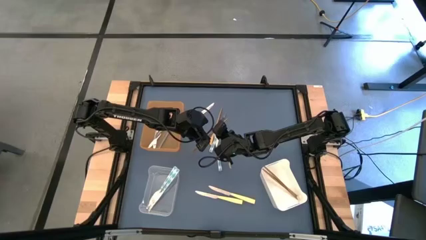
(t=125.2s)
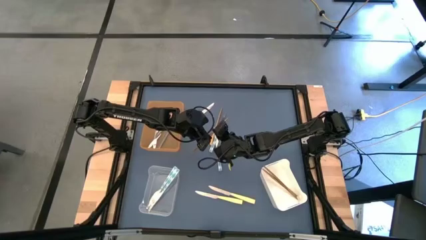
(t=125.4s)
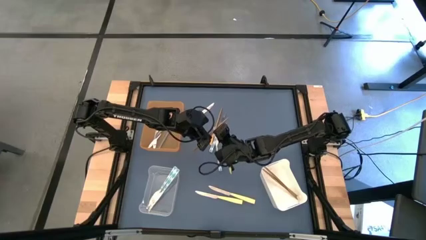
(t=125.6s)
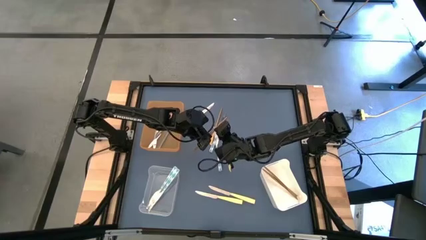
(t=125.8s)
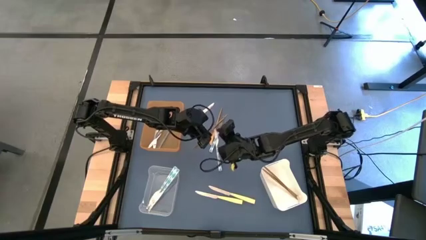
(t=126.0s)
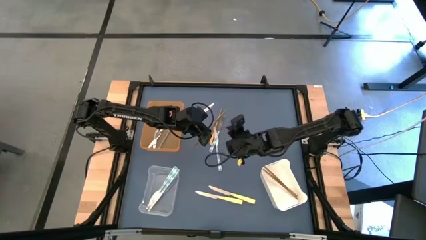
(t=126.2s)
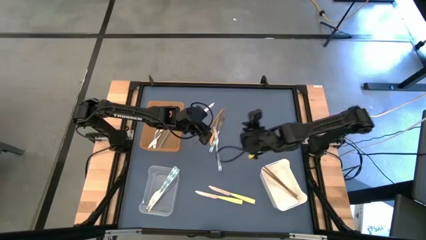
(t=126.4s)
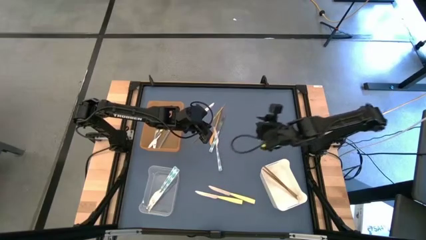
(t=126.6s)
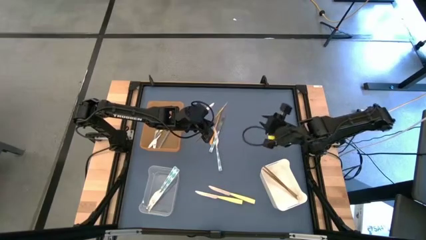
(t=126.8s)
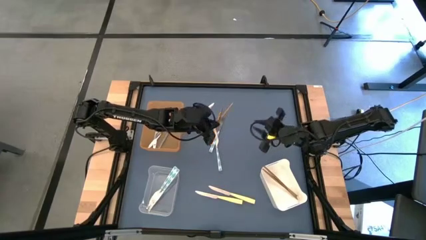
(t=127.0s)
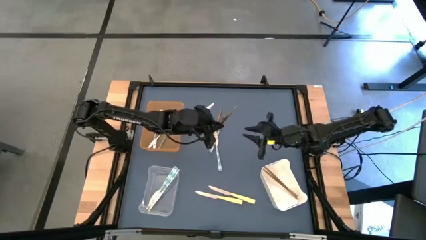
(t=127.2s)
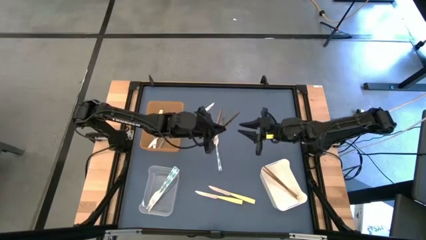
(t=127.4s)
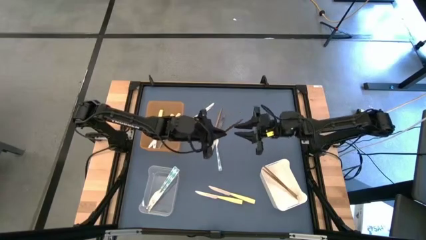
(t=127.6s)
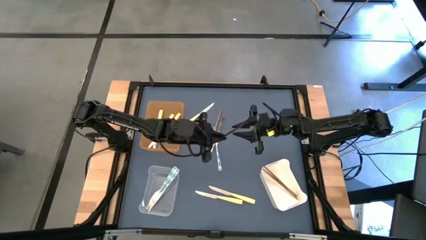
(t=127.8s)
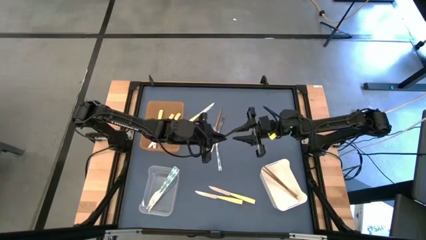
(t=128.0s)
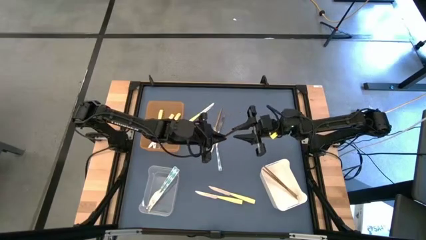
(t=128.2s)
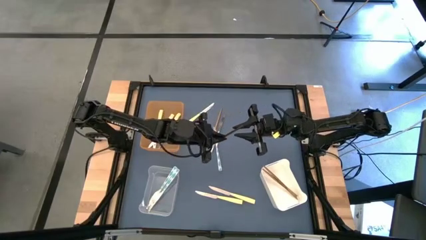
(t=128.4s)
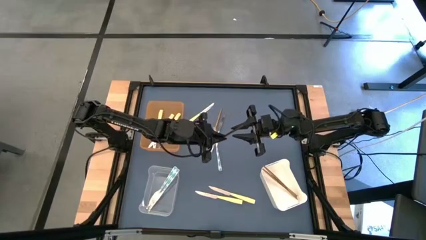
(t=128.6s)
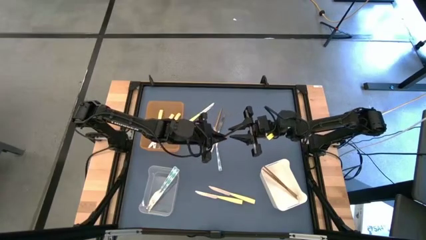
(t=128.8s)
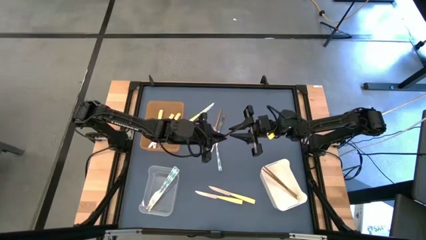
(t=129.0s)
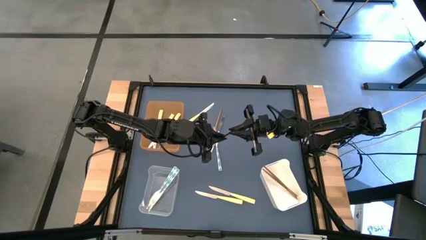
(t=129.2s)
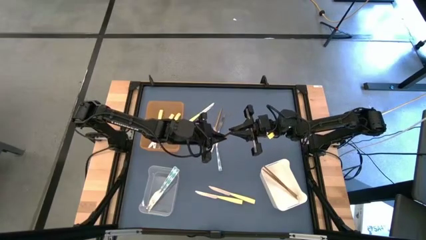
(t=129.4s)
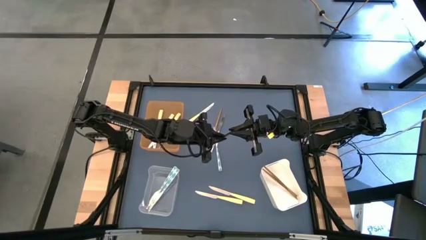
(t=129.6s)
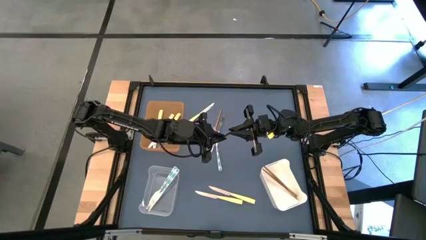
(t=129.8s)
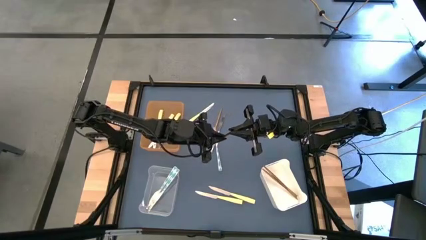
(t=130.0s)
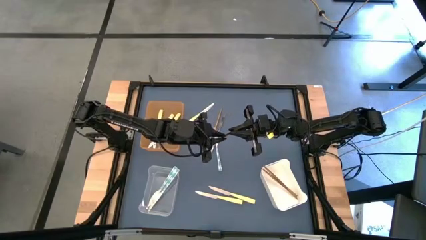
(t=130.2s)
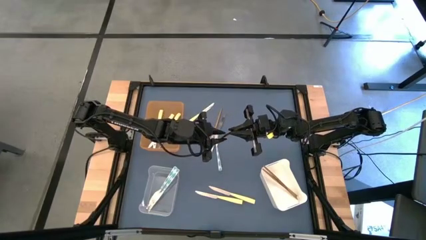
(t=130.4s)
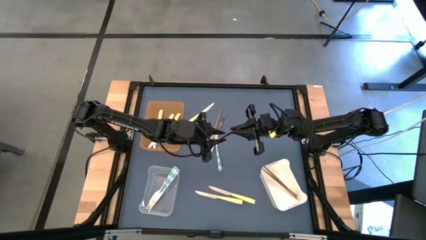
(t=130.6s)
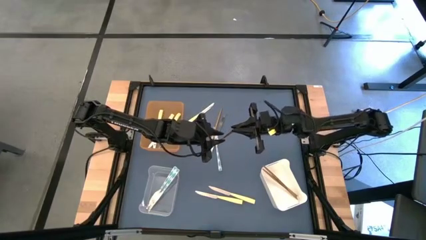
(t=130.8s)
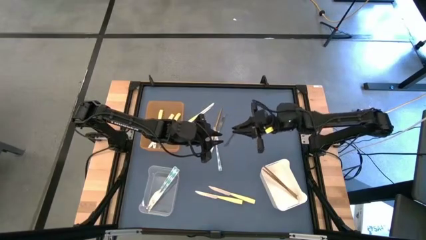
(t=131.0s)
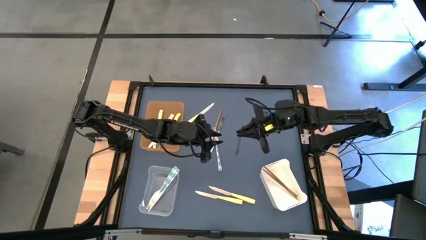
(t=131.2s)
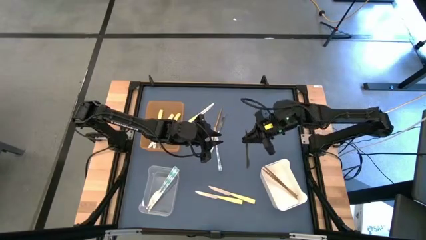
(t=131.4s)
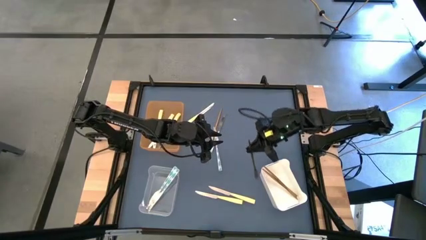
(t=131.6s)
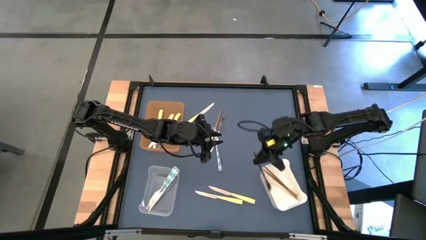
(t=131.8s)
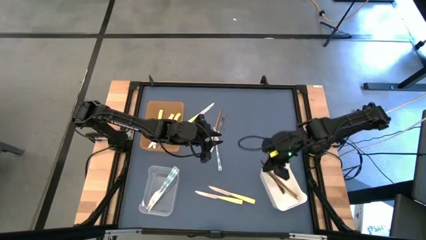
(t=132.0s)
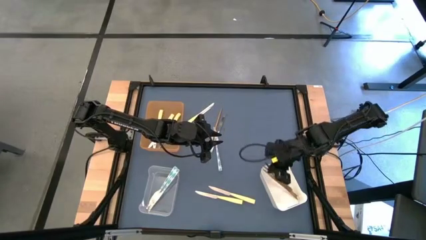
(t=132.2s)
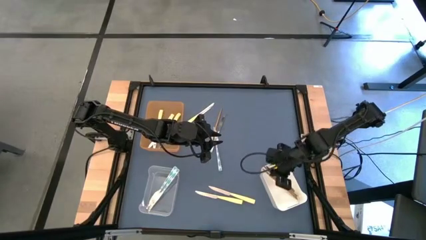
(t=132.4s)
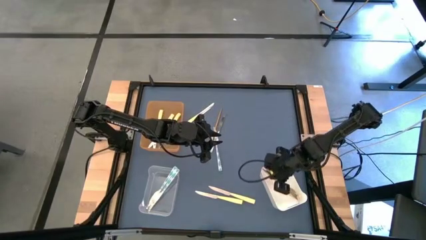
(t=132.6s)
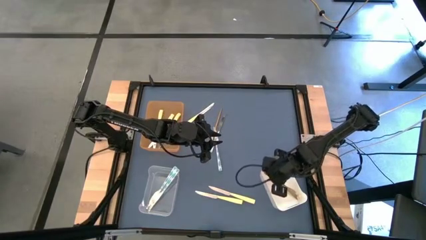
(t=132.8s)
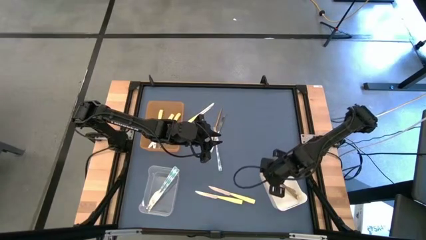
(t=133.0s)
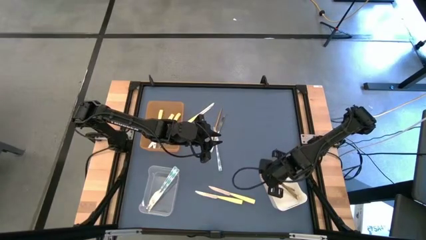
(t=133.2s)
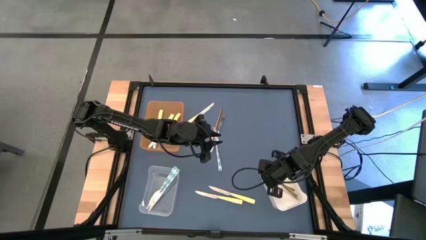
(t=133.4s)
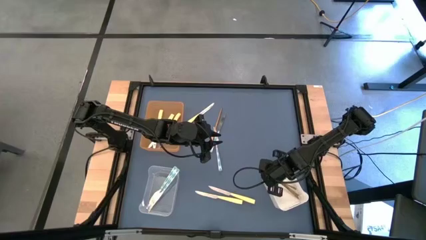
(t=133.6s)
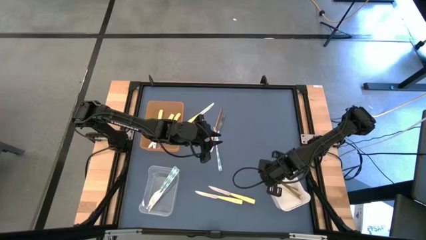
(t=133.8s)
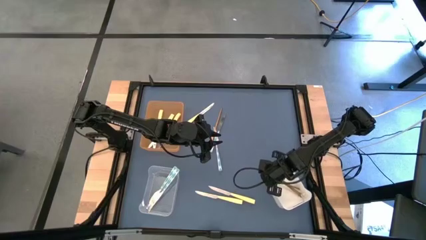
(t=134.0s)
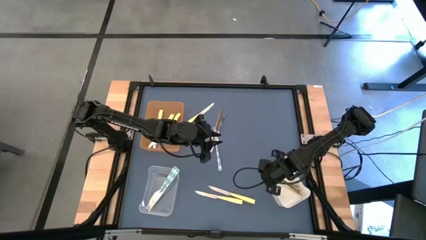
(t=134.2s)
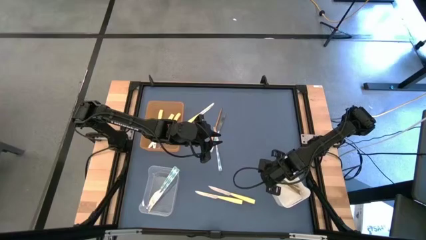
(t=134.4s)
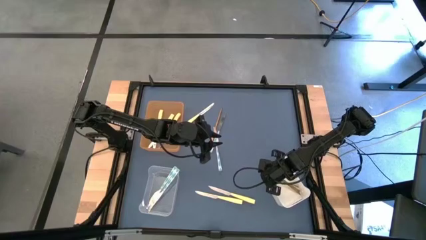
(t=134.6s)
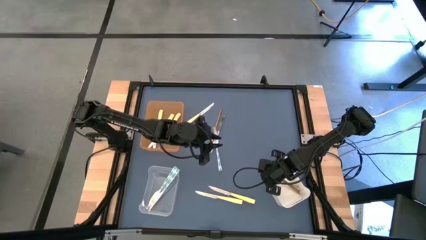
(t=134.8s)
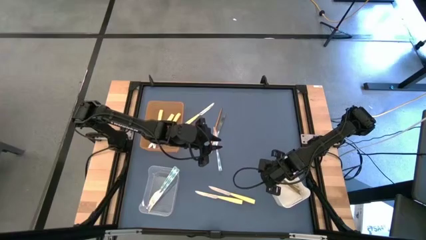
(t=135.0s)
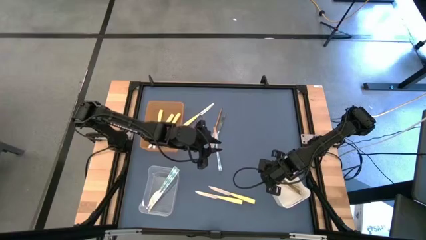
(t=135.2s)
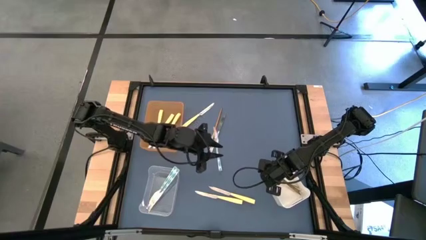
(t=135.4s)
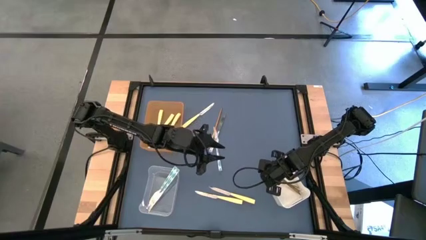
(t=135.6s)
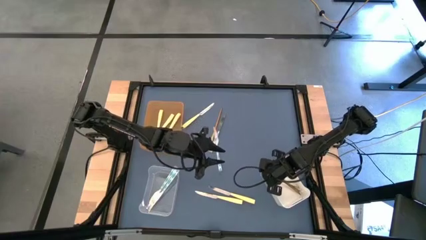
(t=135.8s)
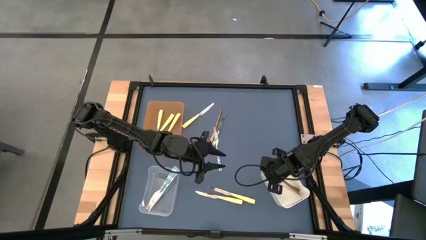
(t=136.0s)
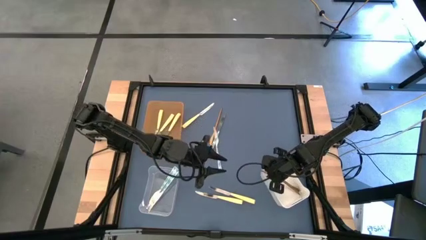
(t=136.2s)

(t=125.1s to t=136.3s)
Task: Sort silverware by color (type)
Put the gold knife into the white bin

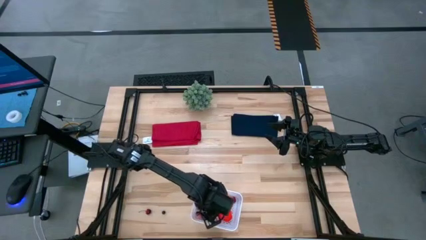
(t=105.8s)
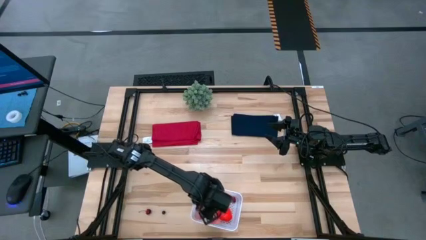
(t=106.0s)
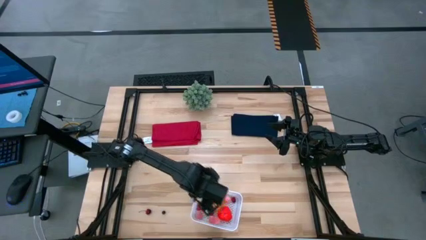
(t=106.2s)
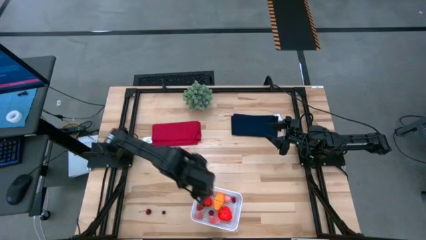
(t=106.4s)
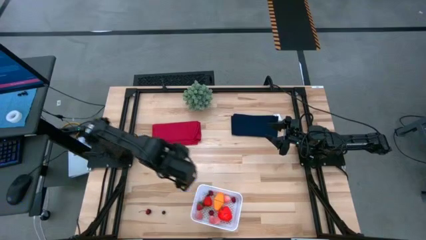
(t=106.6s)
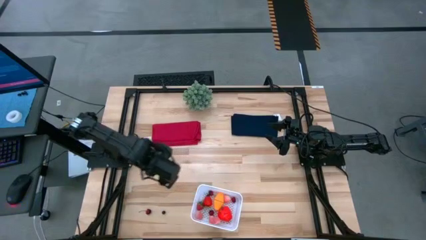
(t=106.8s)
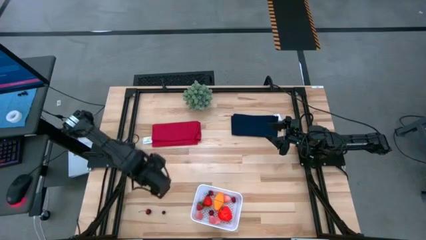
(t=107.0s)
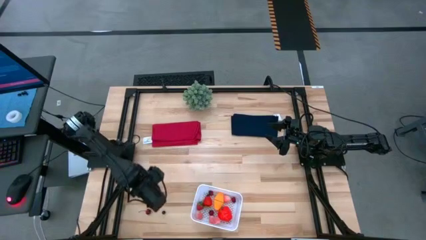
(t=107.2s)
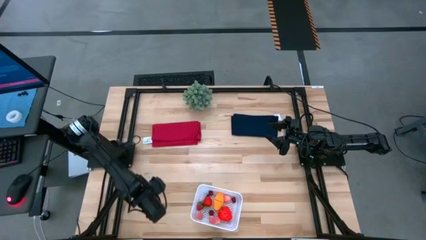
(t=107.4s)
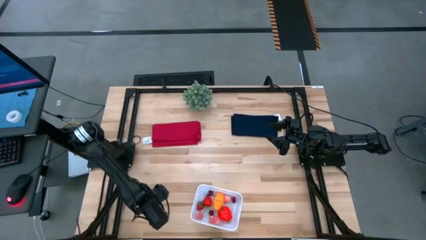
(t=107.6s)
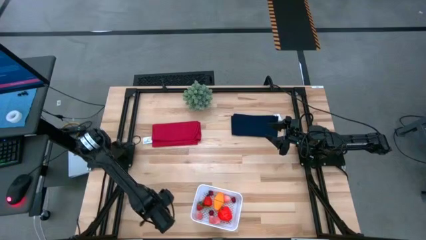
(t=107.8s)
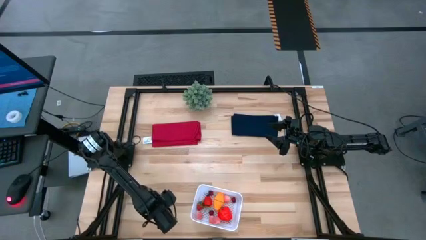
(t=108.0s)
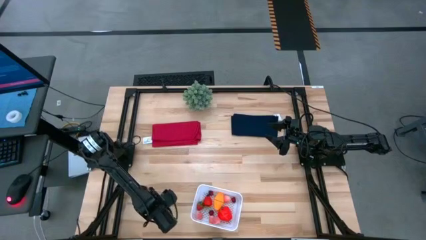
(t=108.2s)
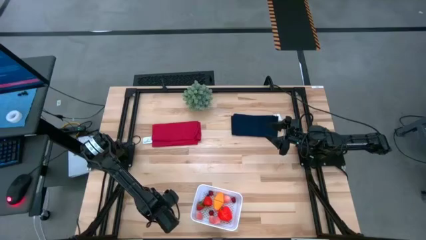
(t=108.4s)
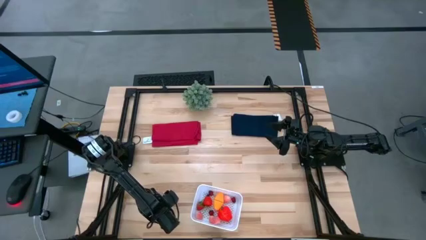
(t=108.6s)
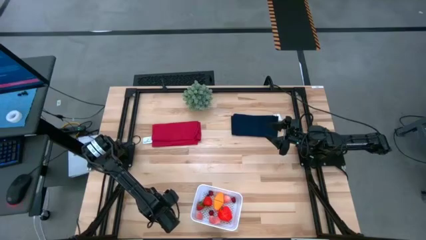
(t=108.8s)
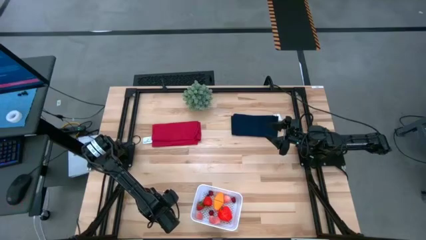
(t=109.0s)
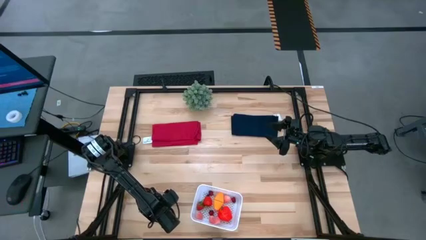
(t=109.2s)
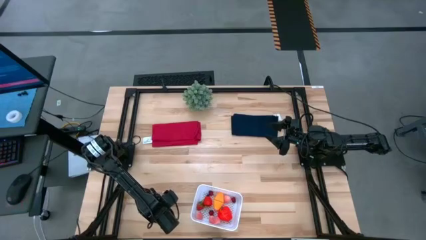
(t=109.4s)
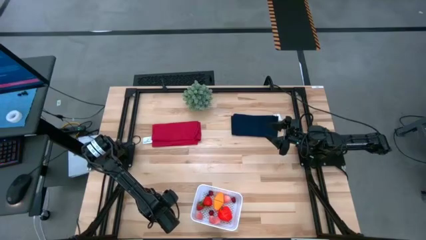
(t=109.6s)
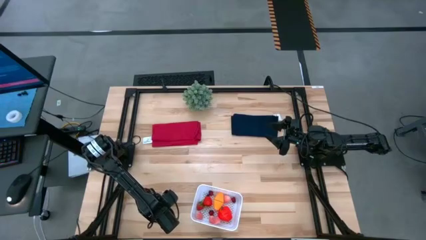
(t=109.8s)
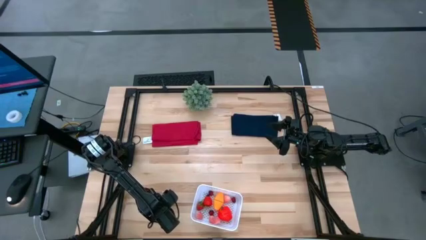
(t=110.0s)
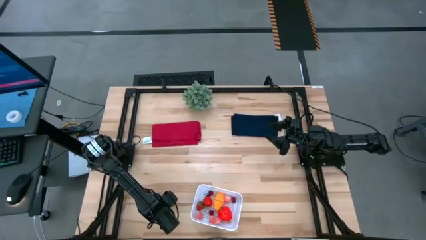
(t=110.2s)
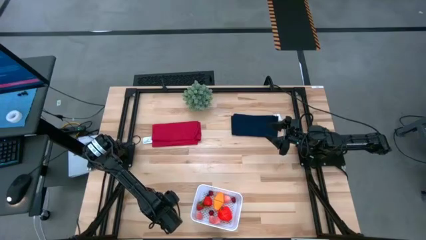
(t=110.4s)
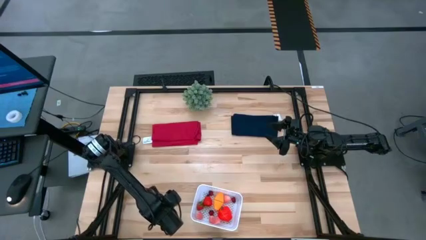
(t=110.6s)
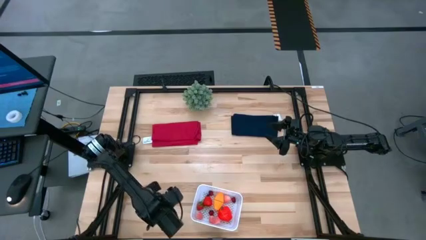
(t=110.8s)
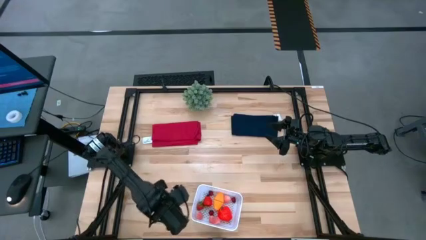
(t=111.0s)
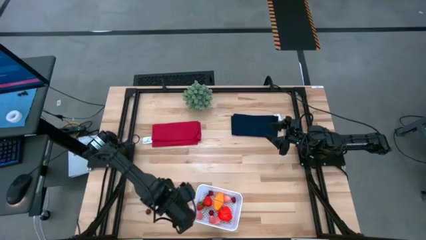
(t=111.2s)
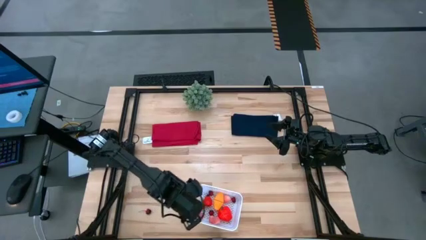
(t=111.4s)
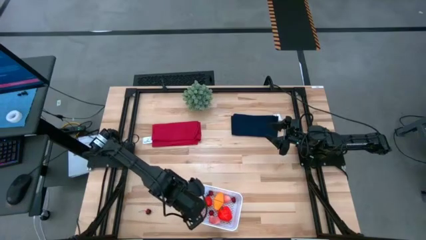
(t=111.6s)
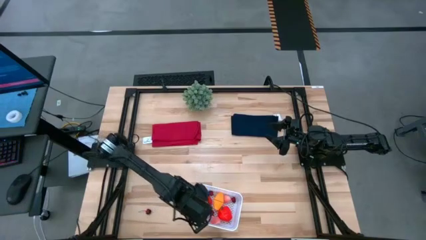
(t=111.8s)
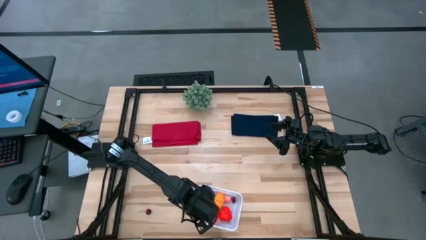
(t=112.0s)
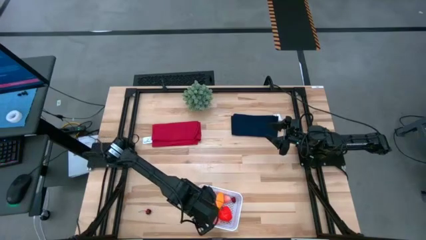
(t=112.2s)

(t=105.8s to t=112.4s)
Task: Pick and placing Produce into tupperware
Put the blueberry into the white bin
